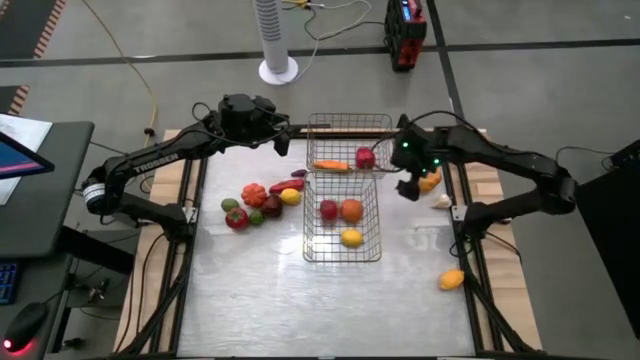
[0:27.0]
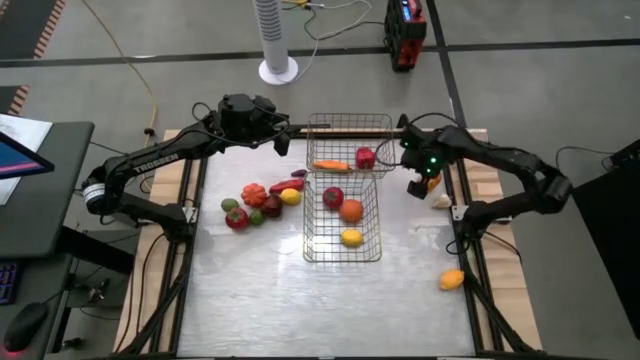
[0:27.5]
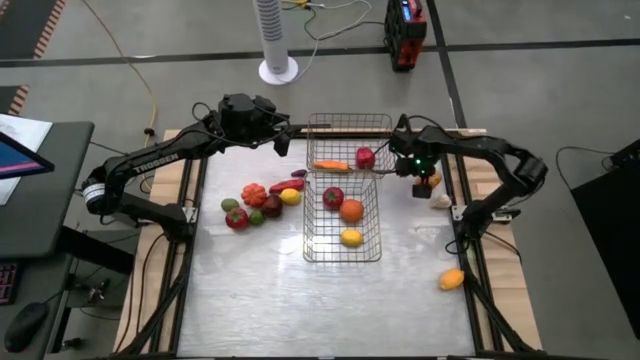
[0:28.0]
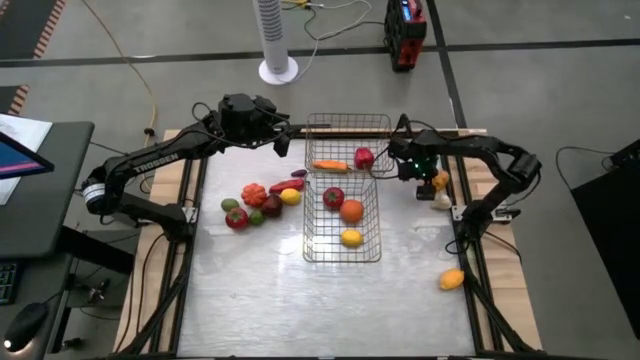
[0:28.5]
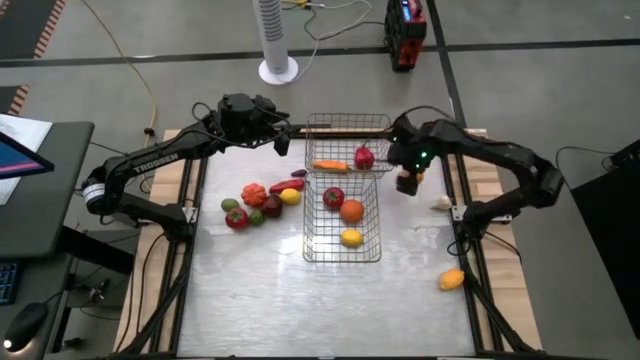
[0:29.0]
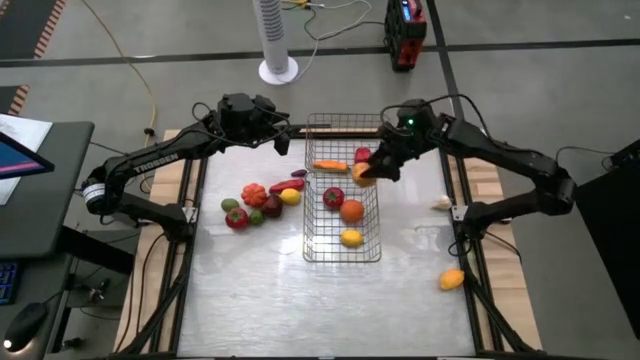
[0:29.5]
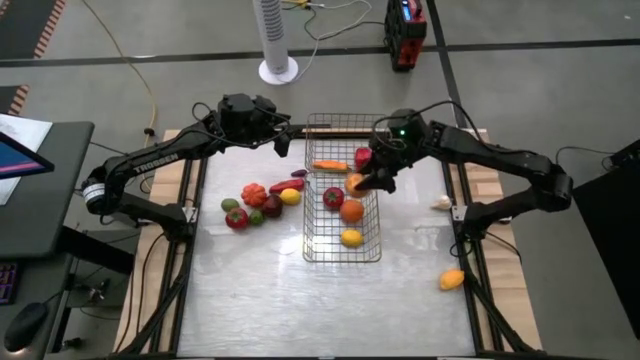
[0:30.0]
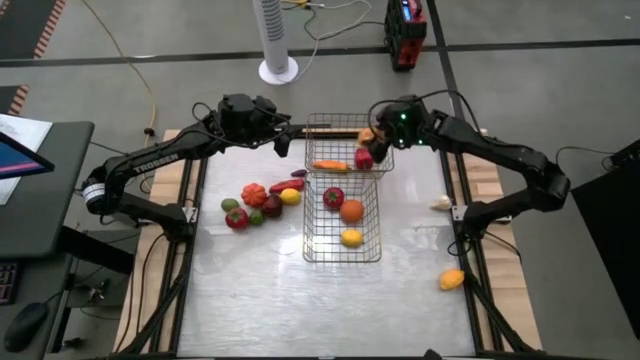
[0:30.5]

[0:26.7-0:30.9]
Task: Sort produce into baskets
Put the mango into the top wire basket

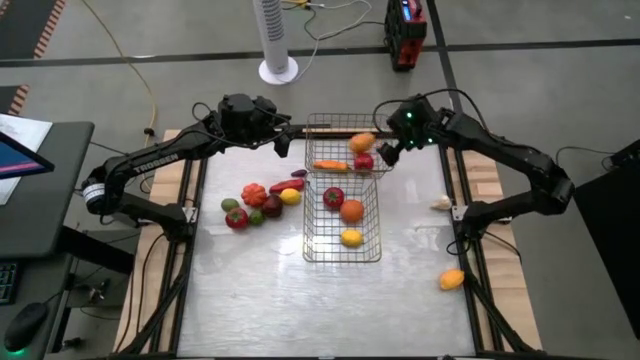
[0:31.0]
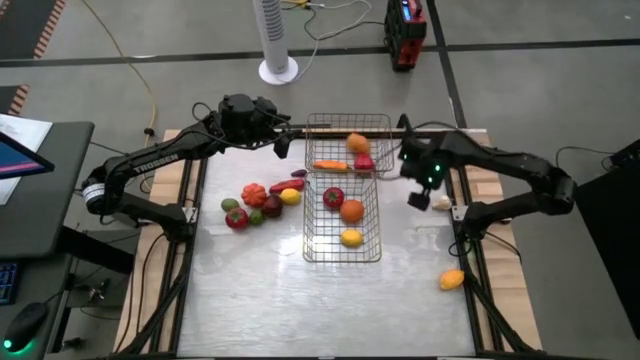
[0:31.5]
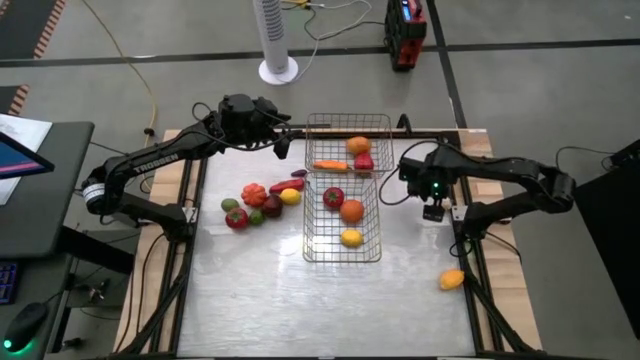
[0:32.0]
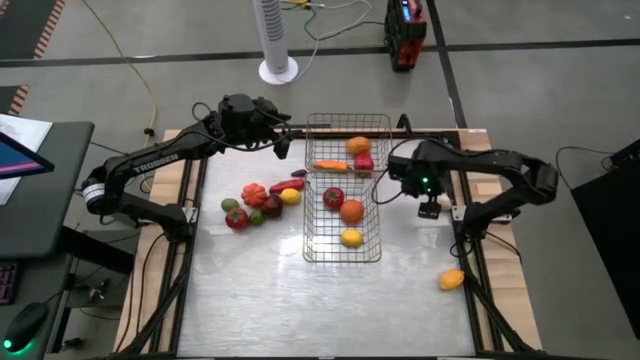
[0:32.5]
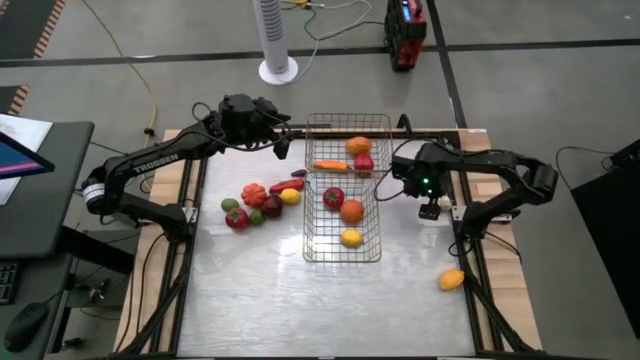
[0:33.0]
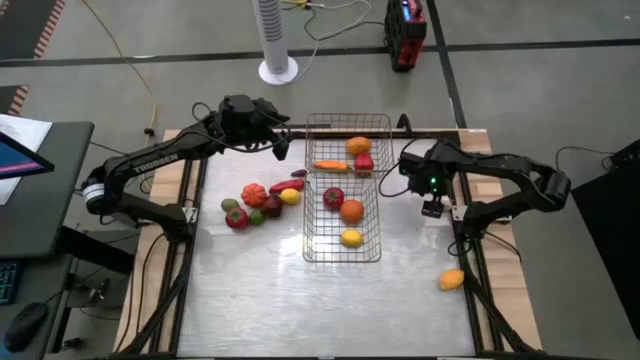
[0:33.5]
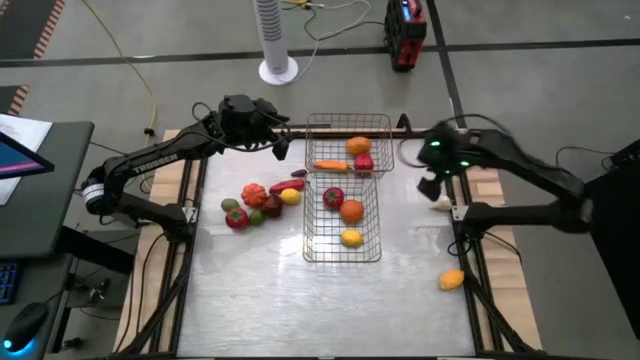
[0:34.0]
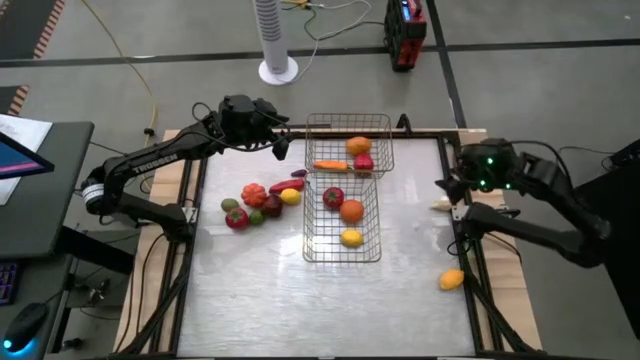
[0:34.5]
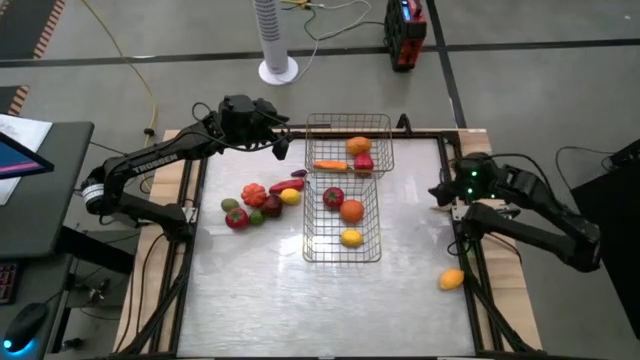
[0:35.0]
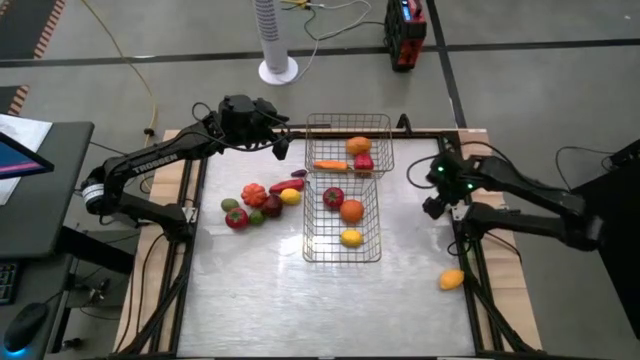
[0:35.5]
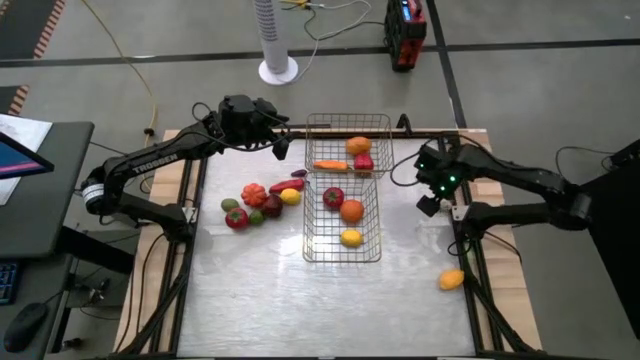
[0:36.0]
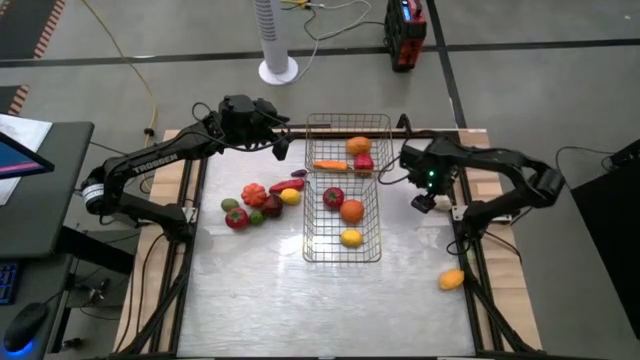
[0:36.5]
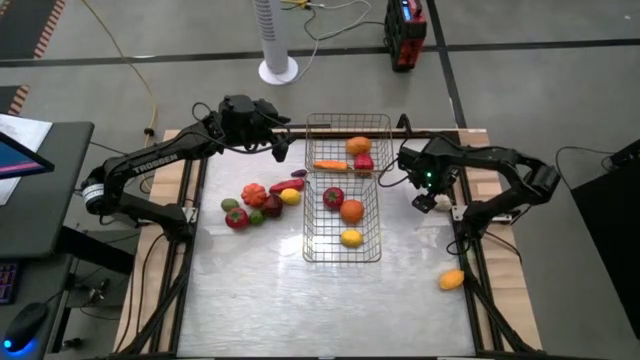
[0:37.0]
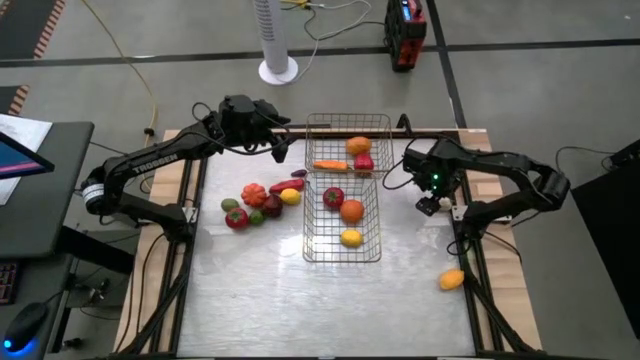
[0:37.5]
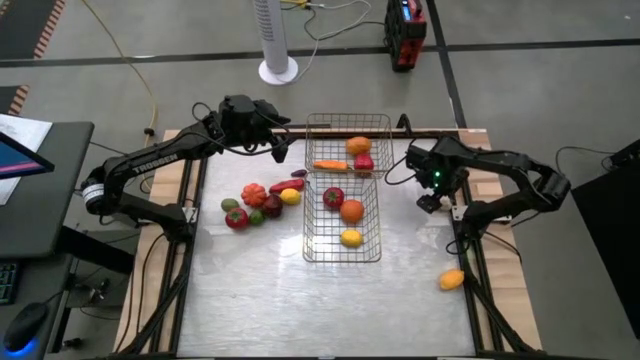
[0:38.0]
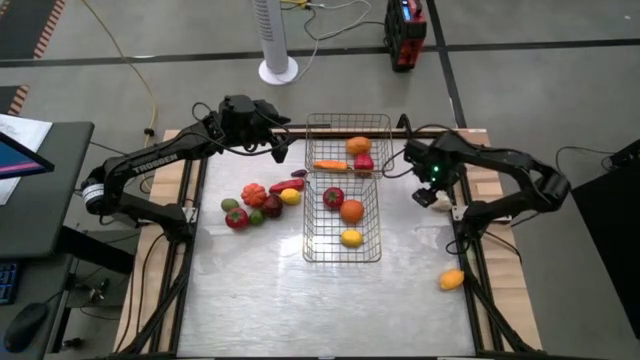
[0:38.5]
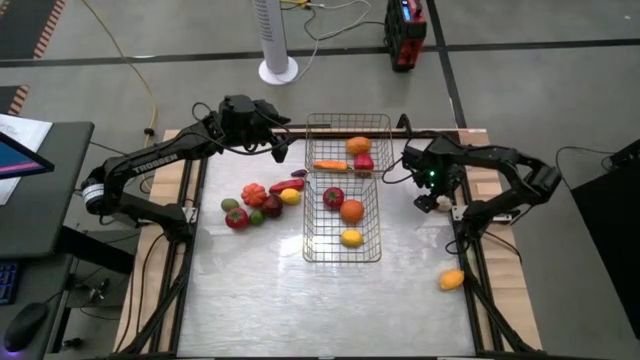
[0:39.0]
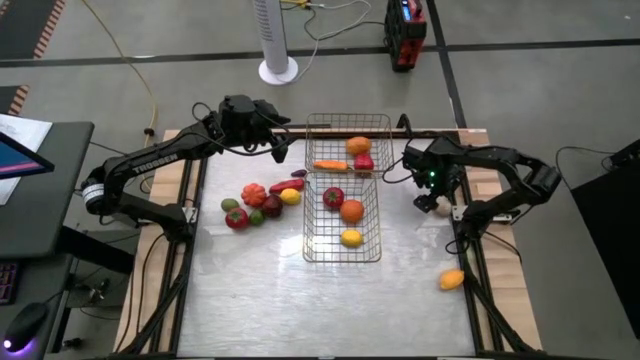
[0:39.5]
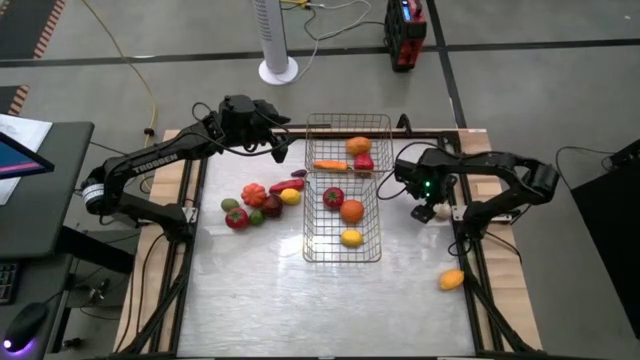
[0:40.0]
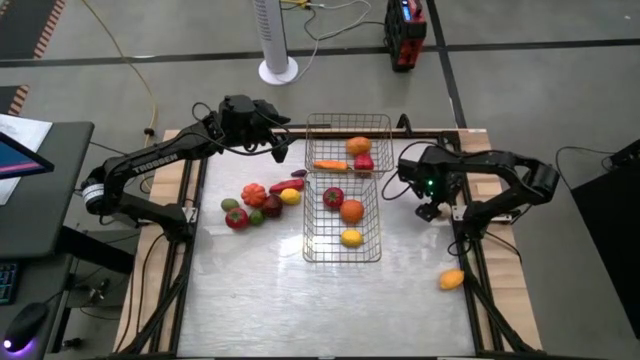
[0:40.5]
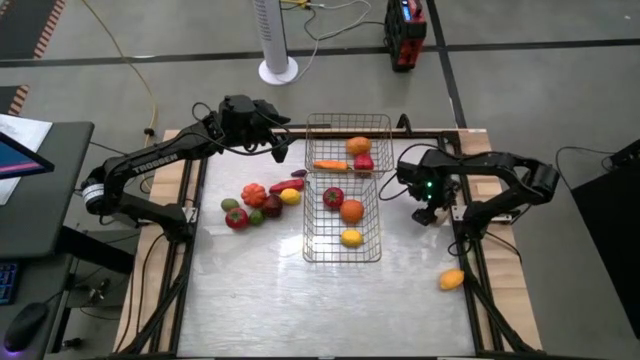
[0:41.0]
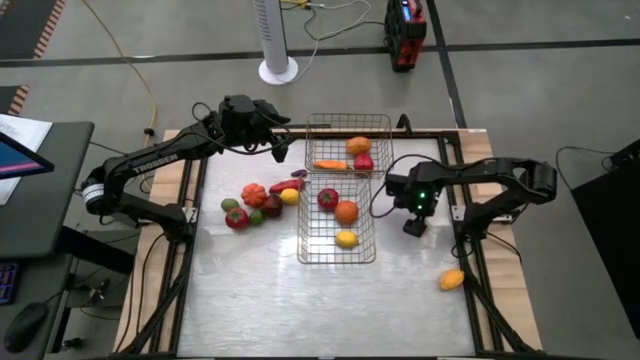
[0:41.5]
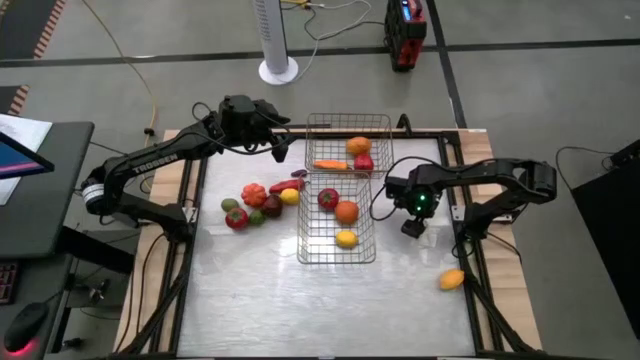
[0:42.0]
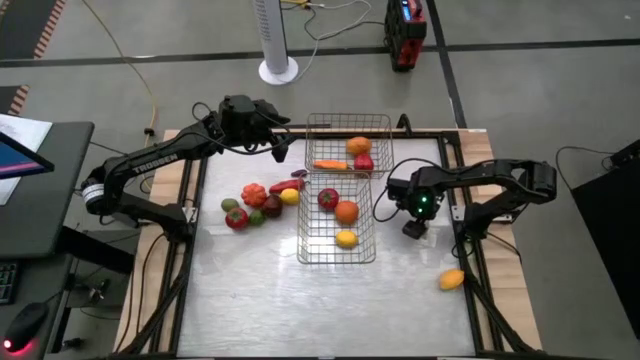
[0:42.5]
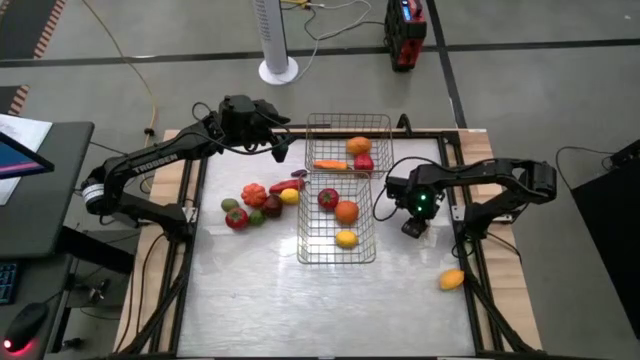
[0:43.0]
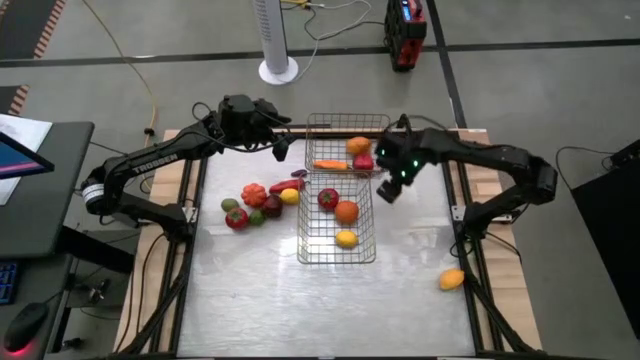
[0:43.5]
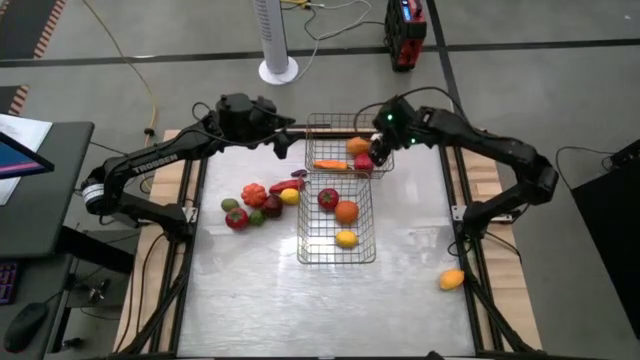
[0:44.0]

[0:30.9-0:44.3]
Put the garlic into the top wire basket

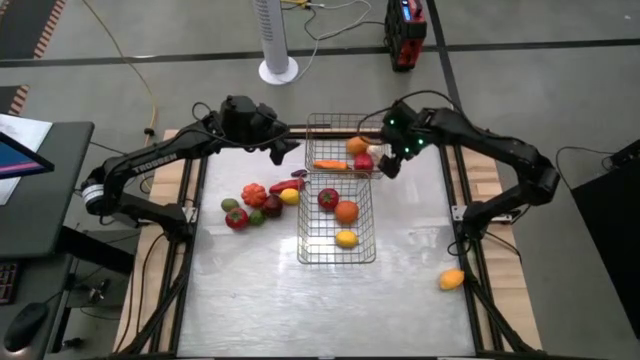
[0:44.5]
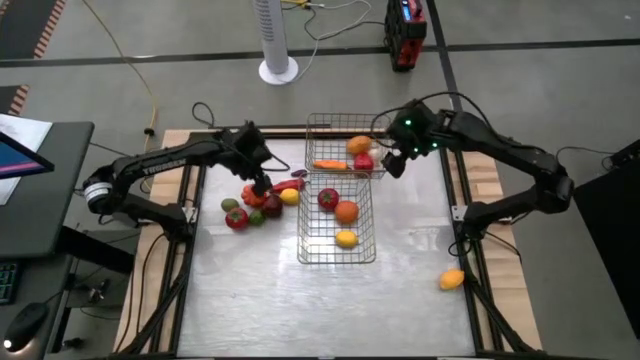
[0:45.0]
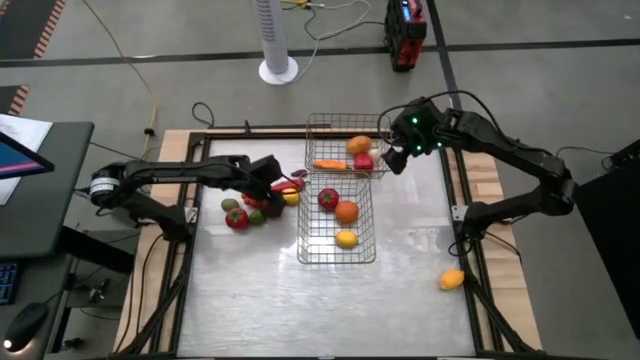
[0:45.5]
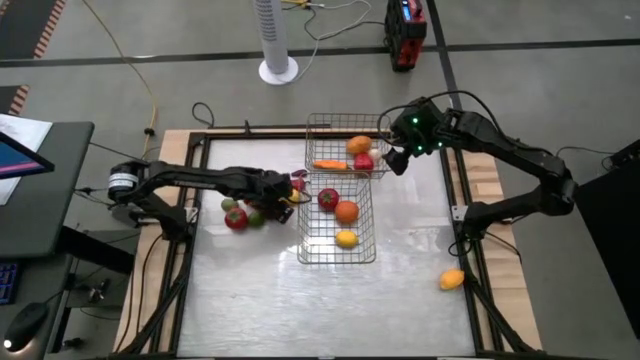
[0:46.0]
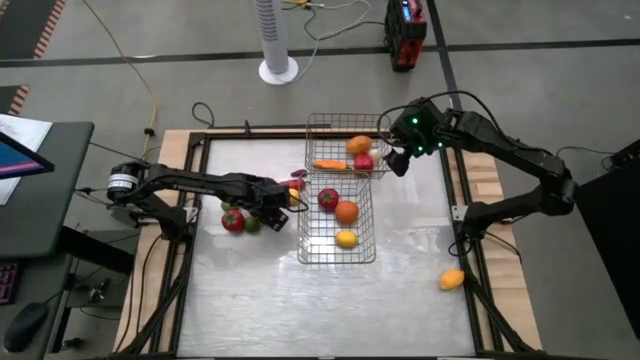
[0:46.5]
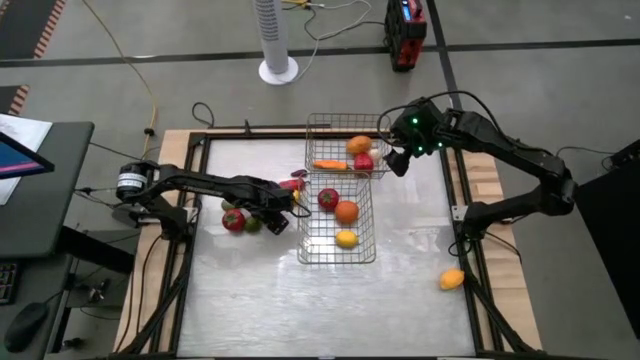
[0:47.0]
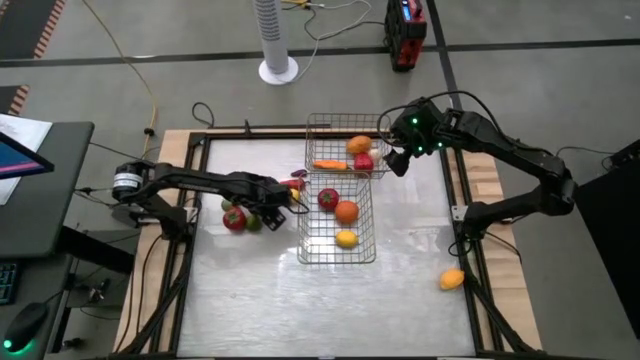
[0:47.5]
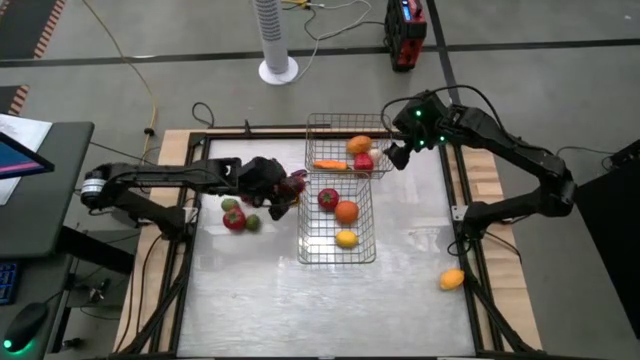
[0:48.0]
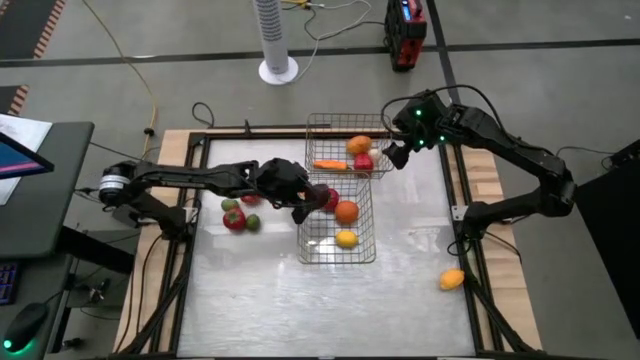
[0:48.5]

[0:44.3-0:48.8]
Put the apple into the bottom wire basket
